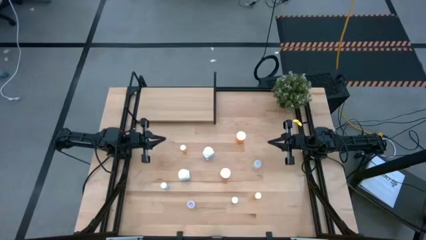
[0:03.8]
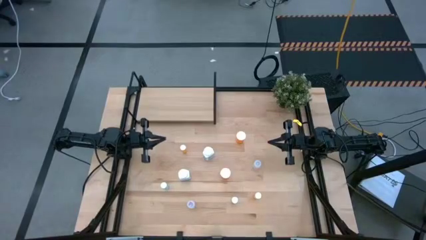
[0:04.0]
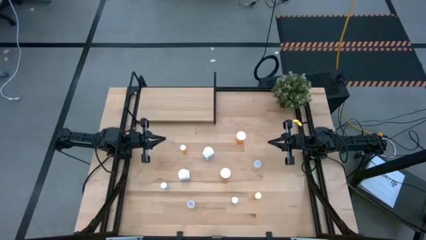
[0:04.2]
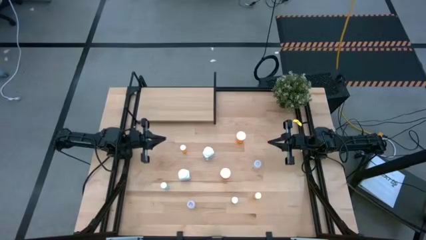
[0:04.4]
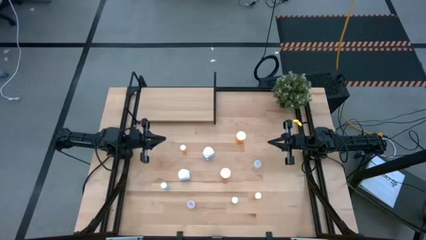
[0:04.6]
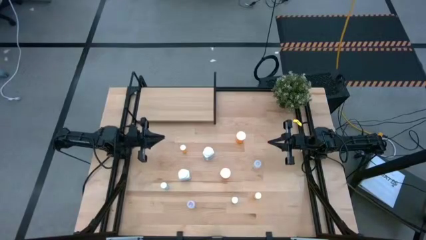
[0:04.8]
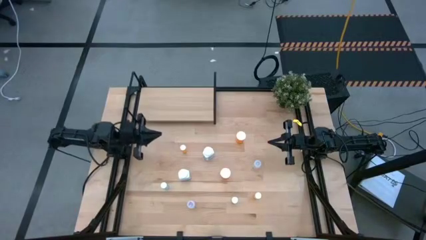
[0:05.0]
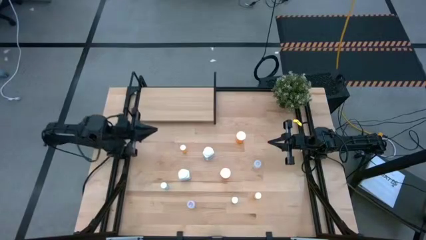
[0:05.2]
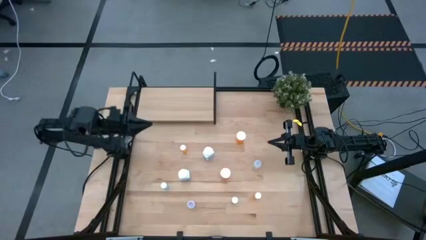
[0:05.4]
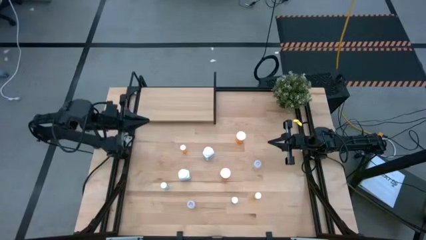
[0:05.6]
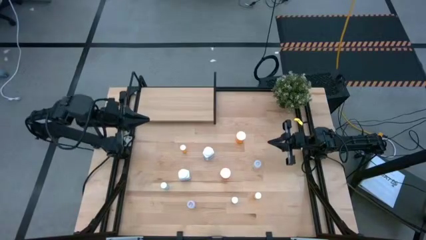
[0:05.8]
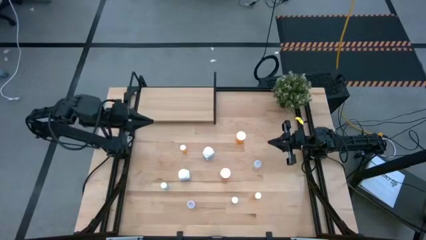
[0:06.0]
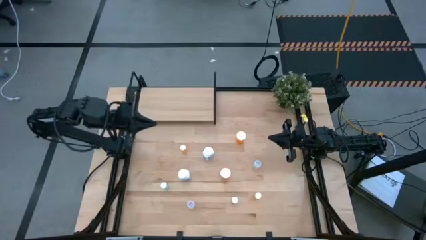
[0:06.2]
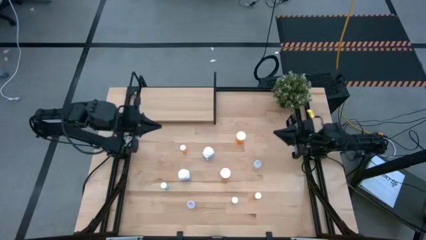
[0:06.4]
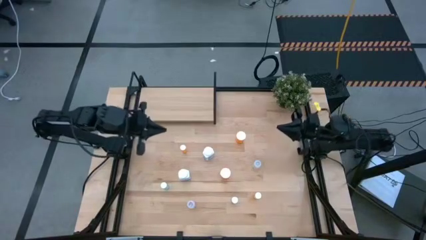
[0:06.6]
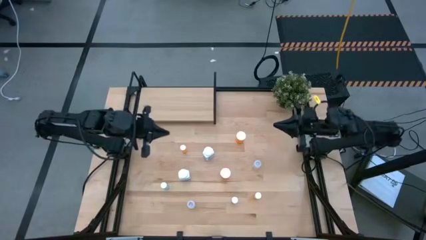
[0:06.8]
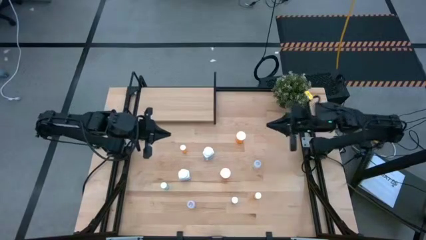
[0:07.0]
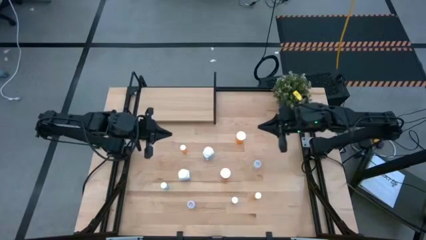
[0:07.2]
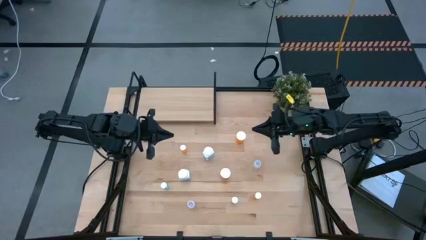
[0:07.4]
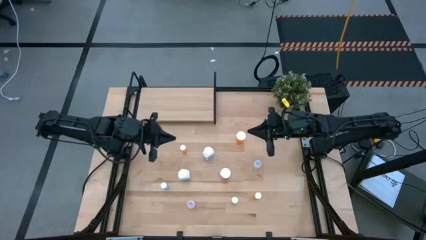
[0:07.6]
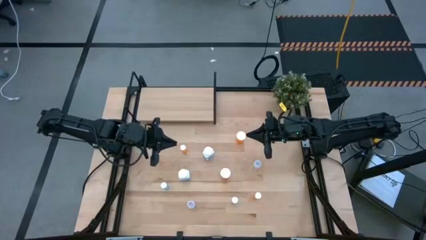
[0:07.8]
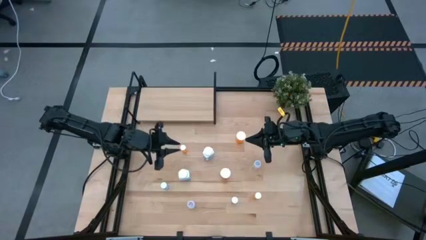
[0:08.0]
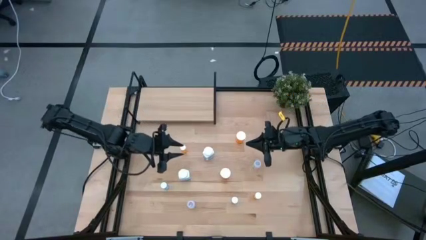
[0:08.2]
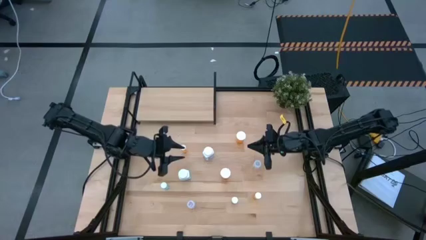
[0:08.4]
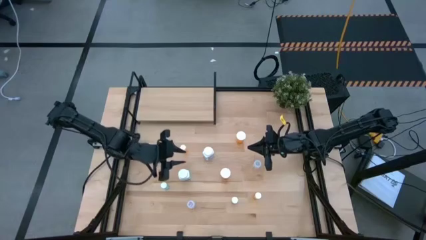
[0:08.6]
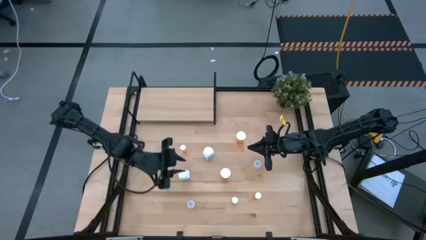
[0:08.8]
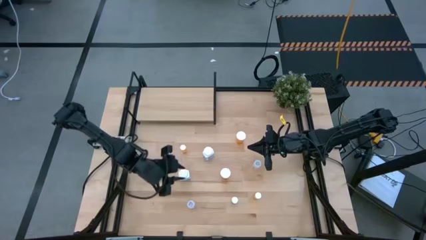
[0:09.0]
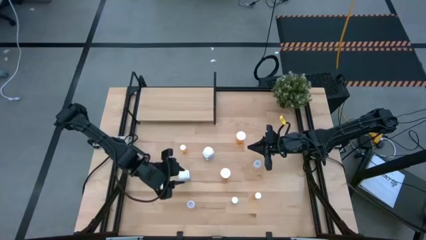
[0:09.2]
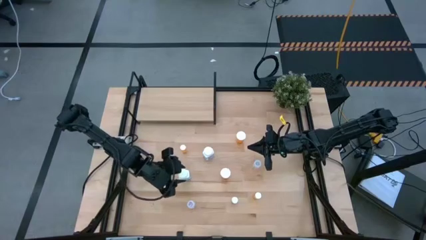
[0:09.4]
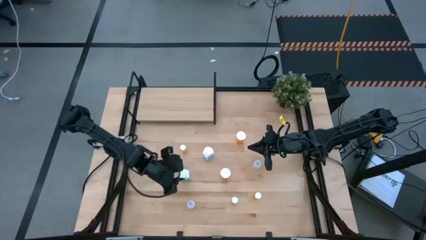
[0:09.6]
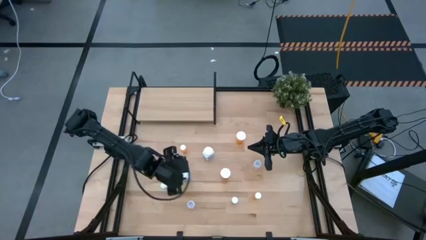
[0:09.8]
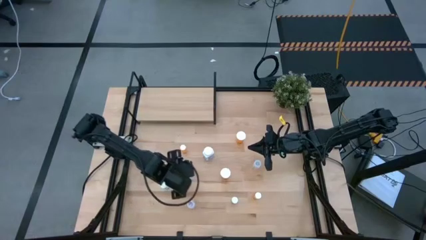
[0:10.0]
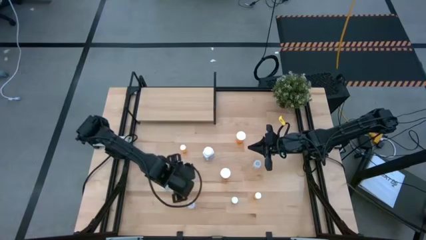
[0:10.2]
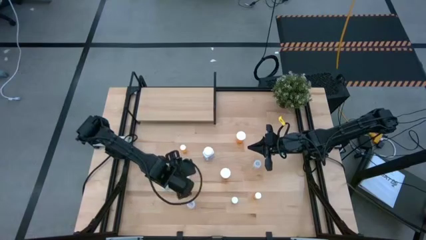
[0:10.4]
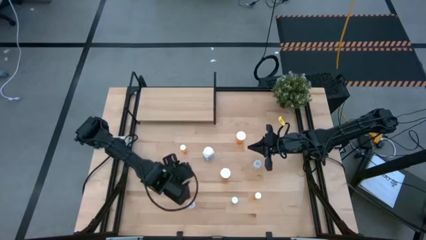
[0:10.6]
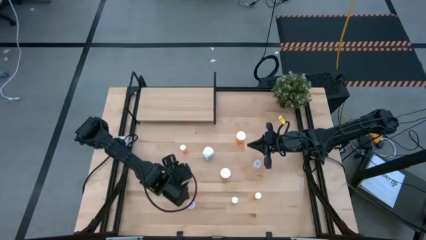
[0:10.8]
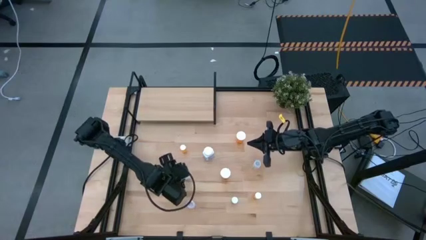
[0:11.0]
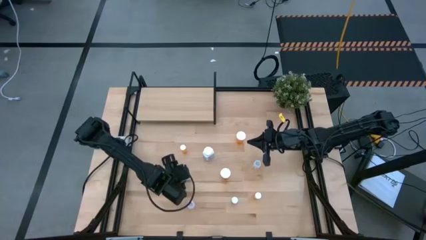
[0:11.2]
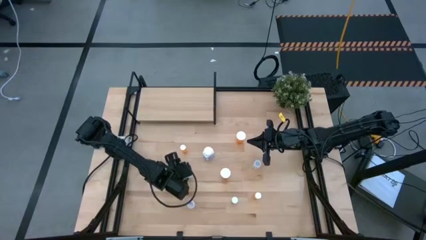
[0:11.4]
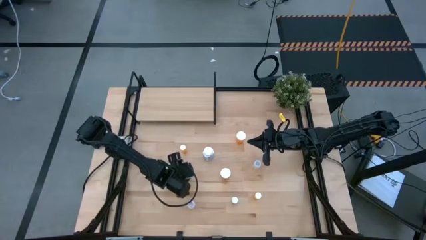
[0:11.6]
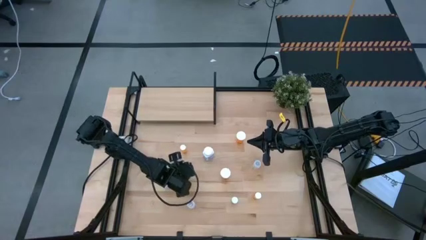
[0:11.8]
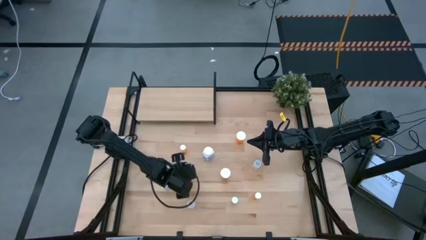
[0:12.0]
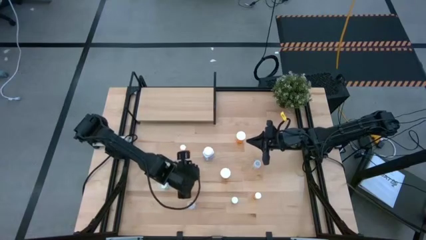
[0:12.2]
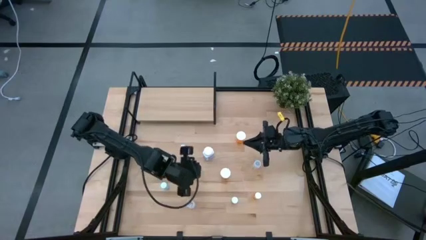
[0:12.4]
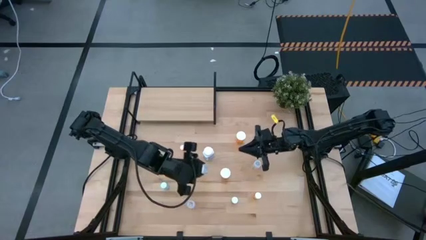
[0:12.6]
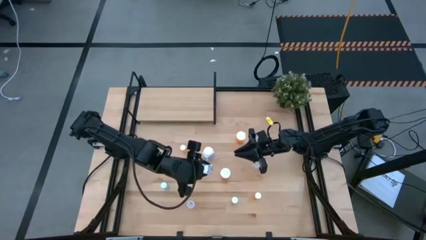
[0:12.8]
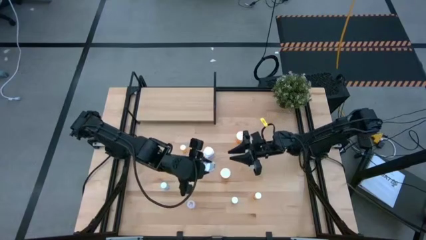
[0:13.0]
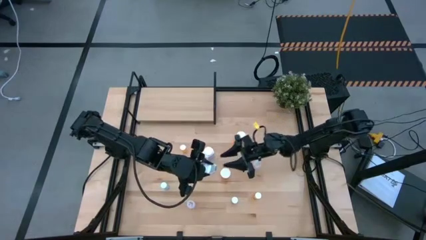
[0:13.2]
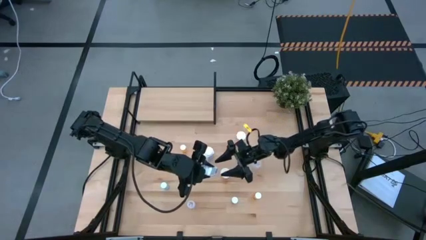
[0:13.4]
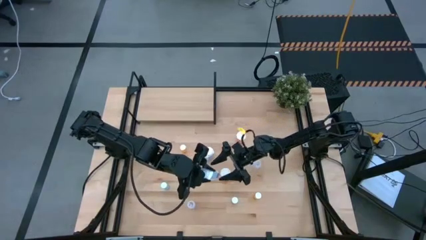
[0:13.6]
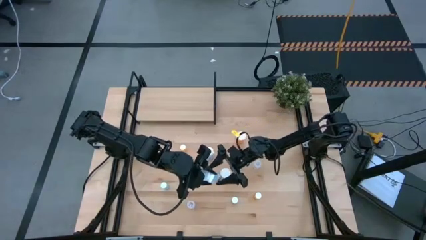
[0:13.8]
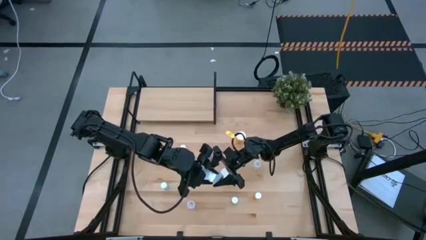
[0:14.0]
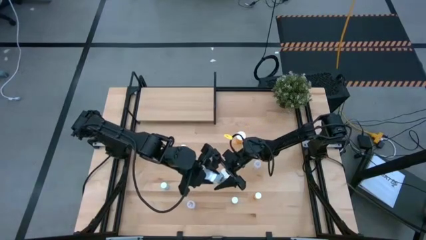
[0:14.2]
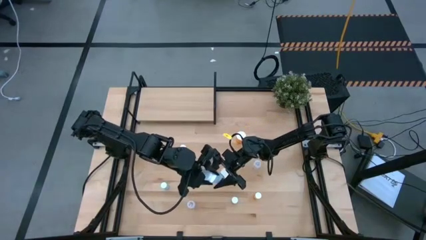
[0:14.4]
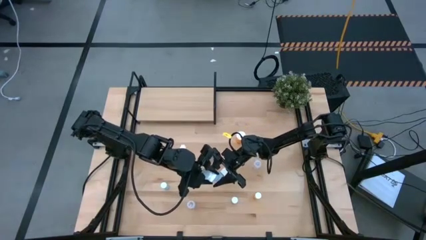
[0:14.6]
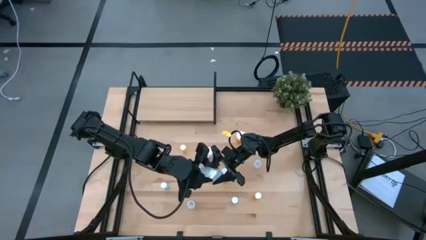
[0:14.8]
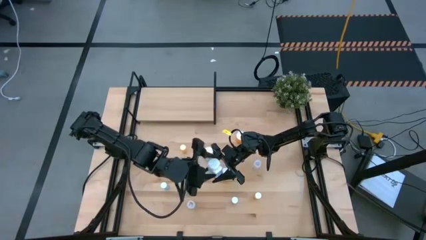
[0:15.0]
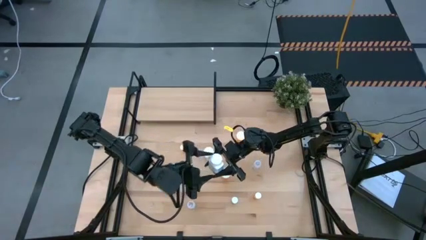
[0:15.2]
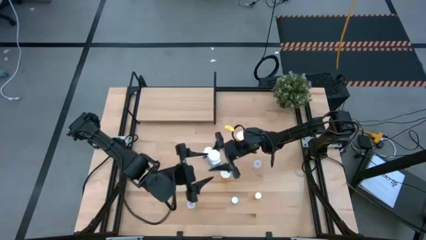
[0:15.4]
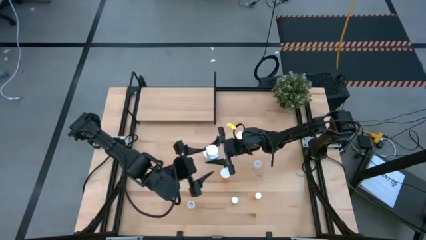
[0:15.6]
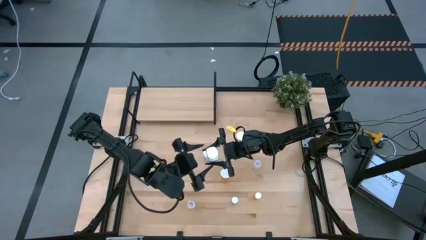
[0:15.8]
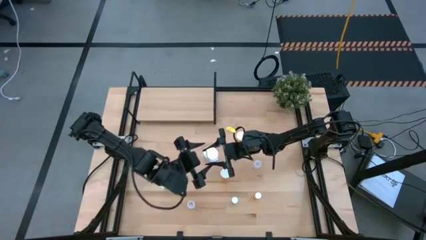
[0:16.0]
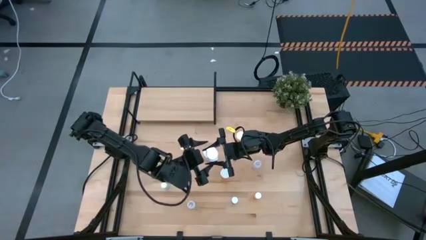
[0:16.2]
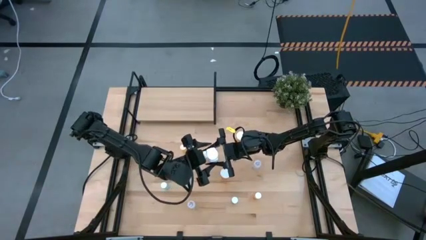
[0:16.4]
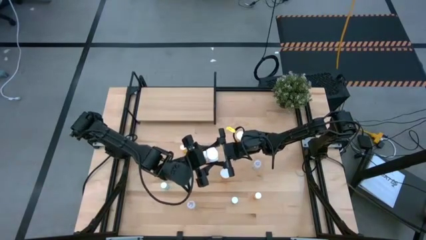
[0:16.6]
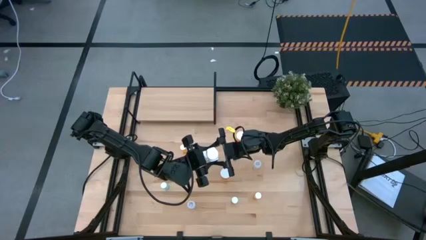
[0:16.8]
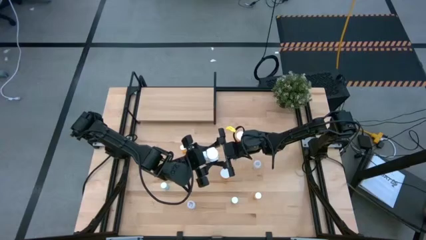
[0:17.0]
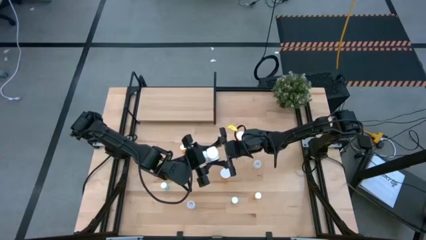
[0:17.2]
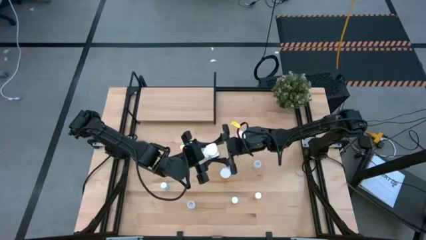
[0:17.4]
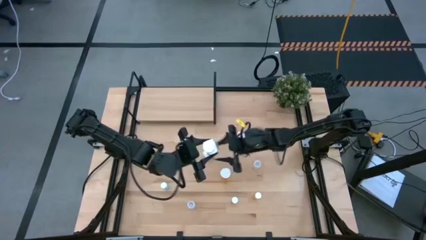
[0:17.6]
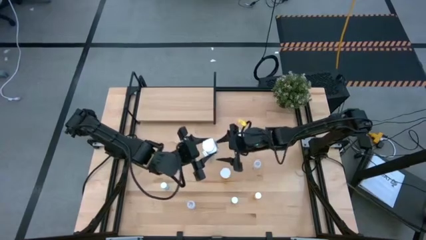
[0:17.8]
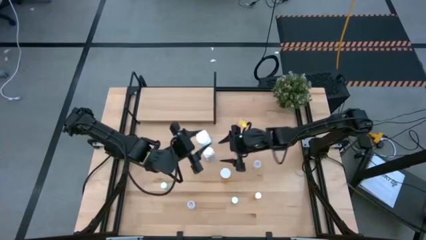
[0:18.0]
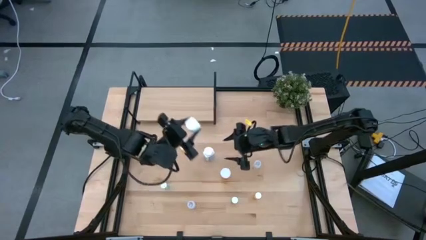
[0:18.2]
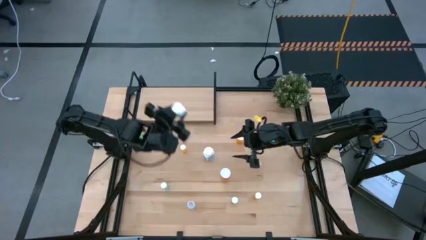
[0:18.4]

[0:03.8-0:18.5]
Task: Pick and place medicine bottles onto shelf by color
Put the bottom white pill bottle on the shelf
